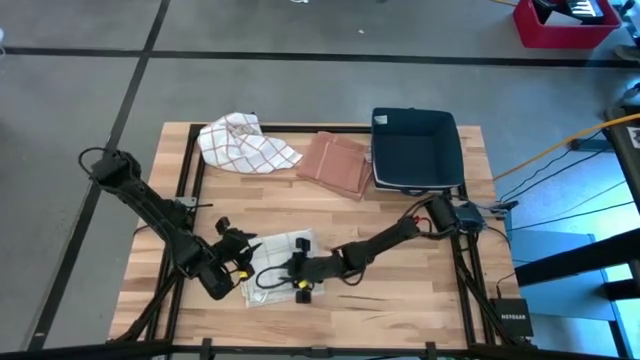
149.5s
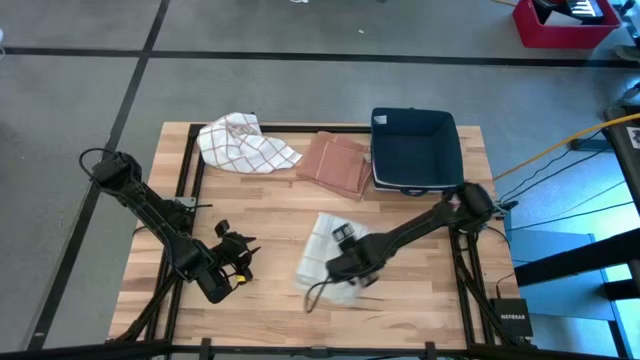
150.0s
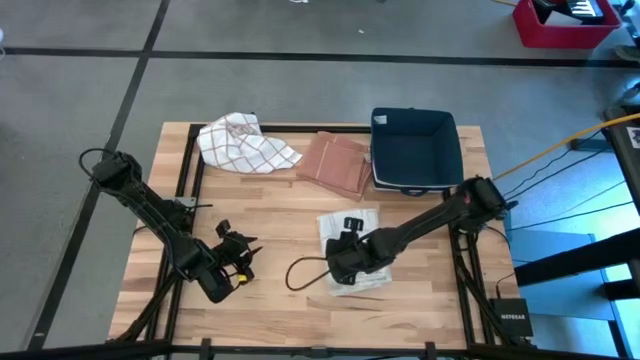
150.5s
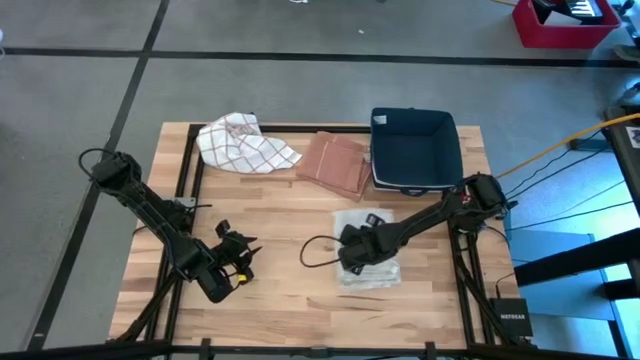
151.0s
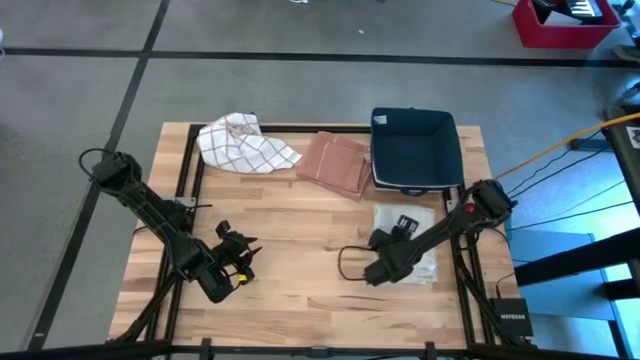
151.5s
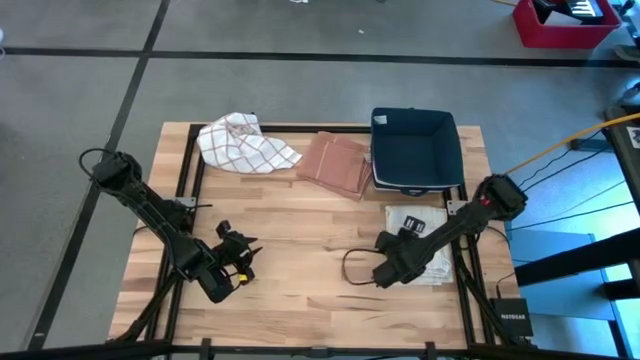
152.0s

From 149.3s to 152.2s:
Task: Fold towel
Move the bottom white towel to the middle right of the table

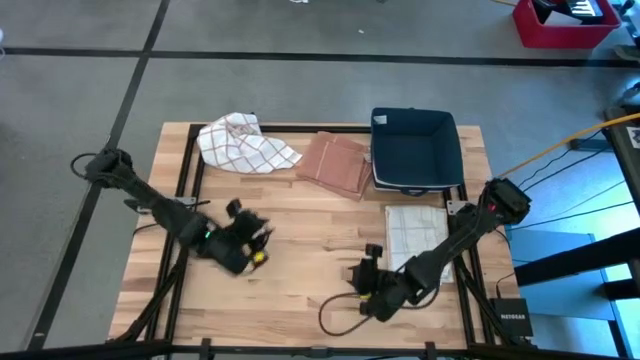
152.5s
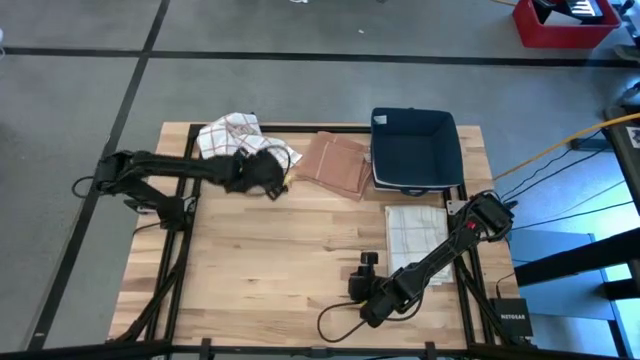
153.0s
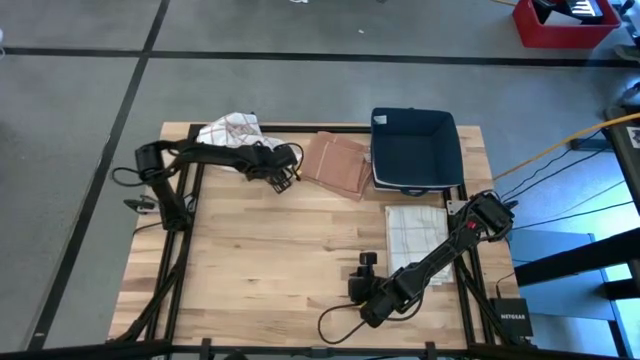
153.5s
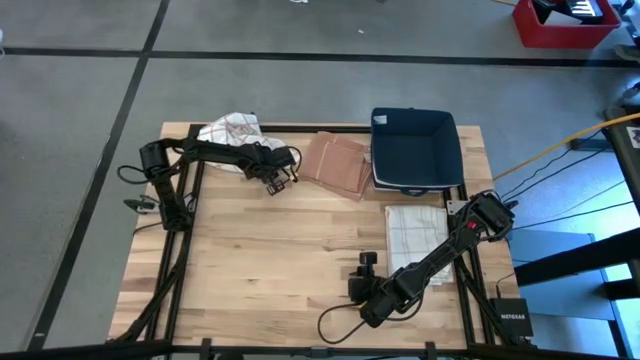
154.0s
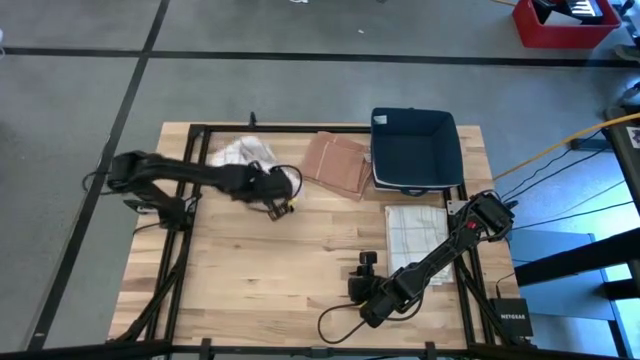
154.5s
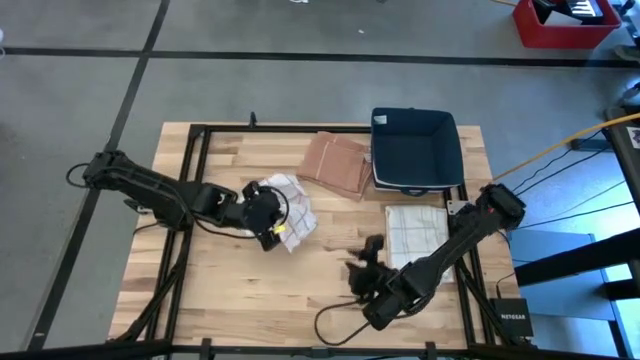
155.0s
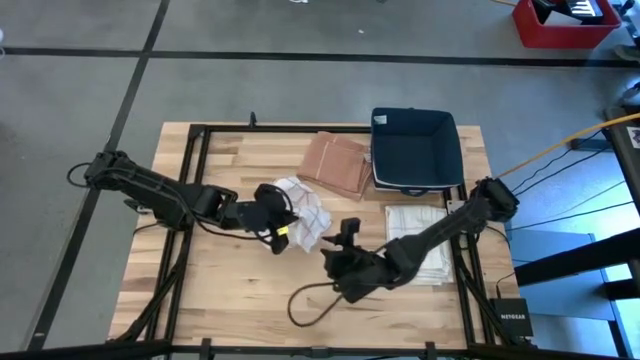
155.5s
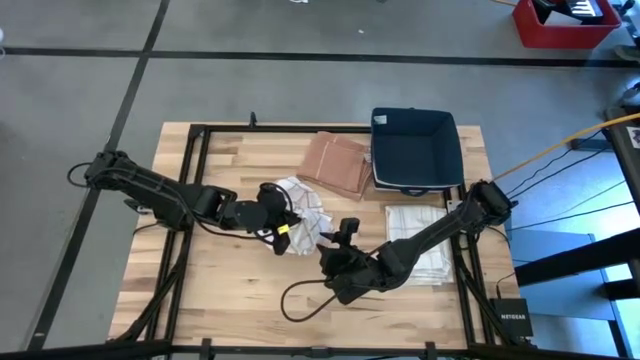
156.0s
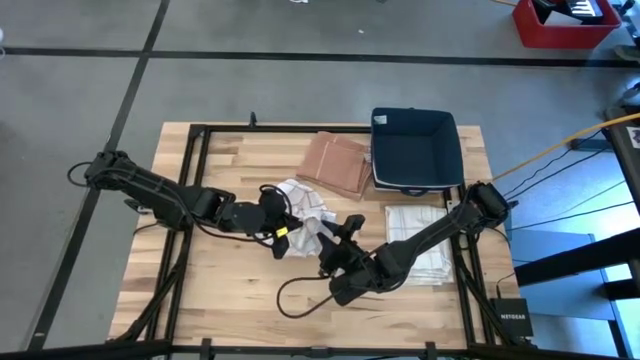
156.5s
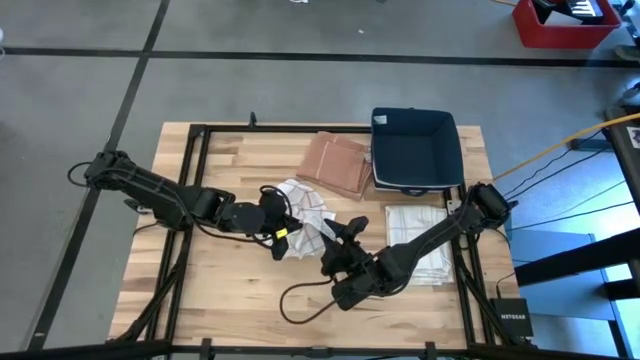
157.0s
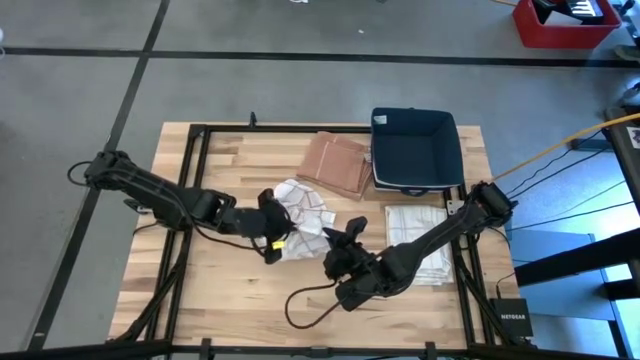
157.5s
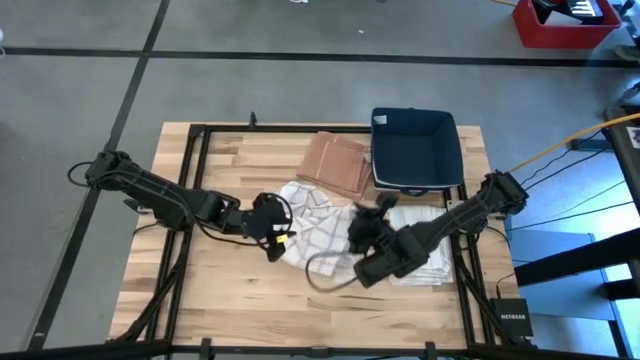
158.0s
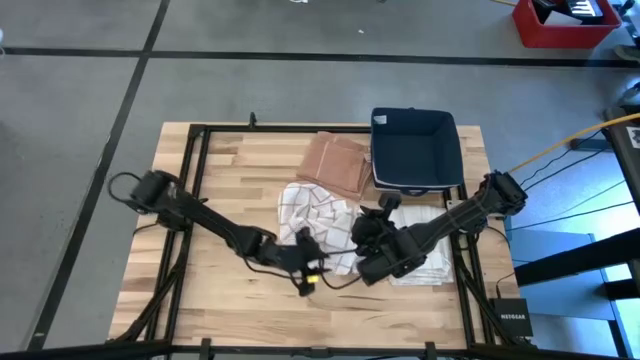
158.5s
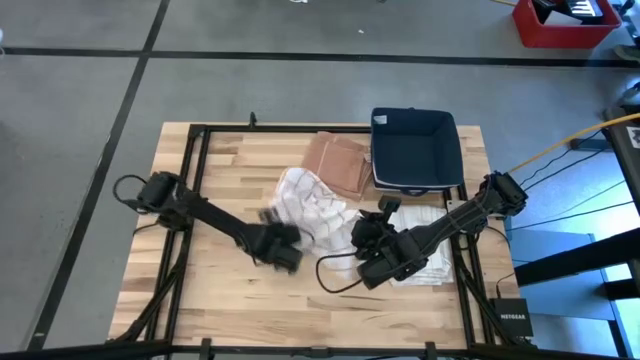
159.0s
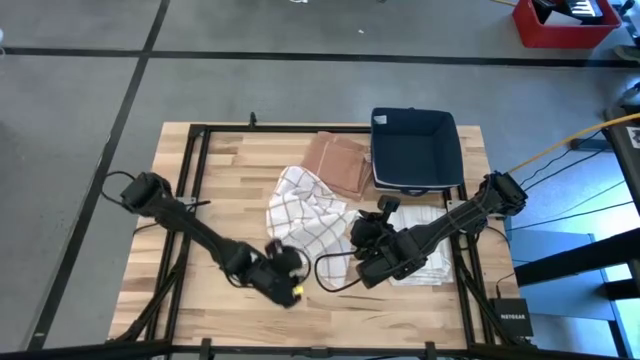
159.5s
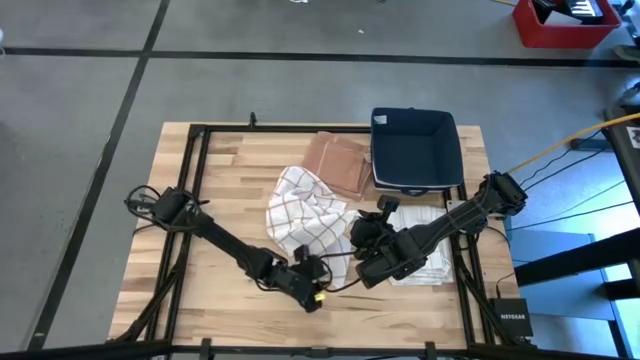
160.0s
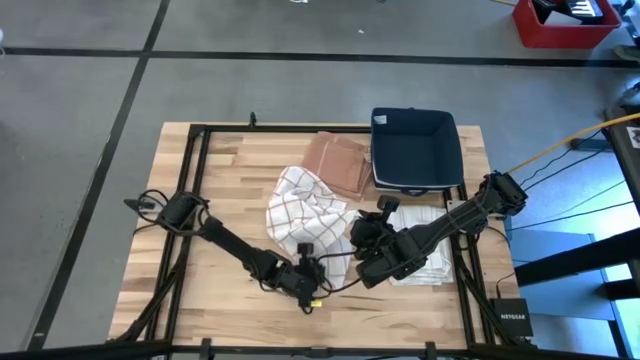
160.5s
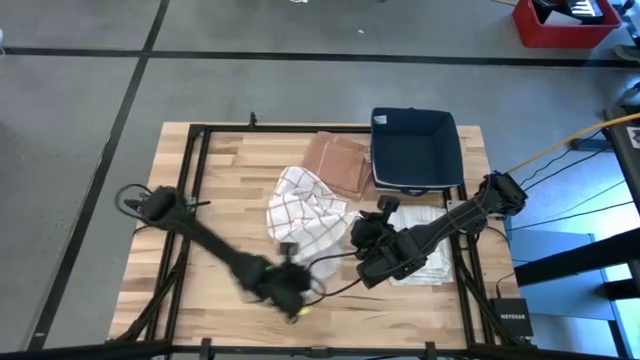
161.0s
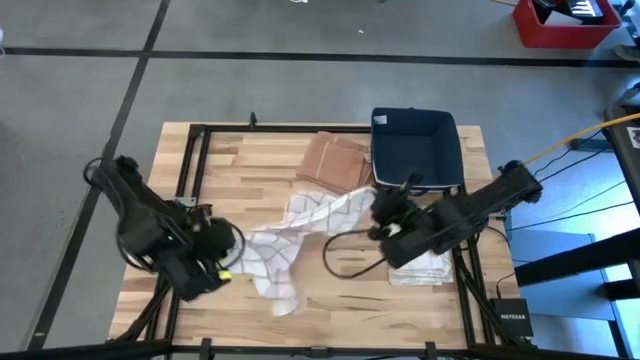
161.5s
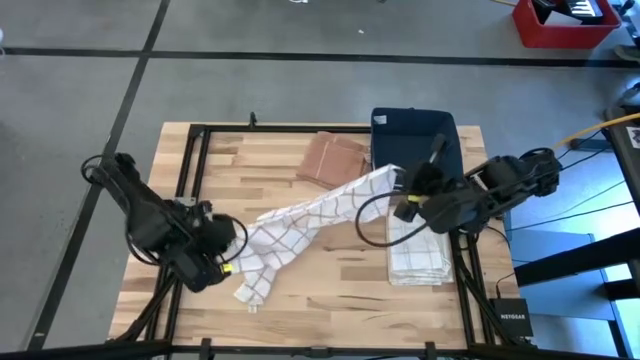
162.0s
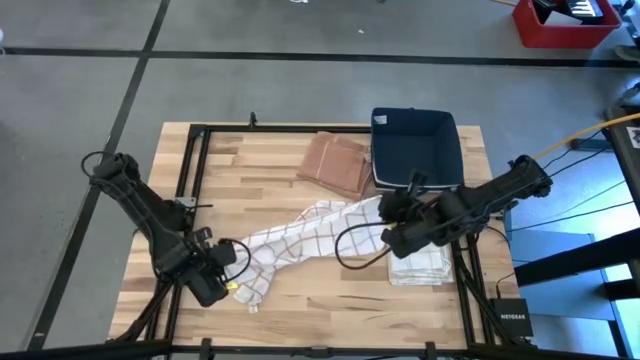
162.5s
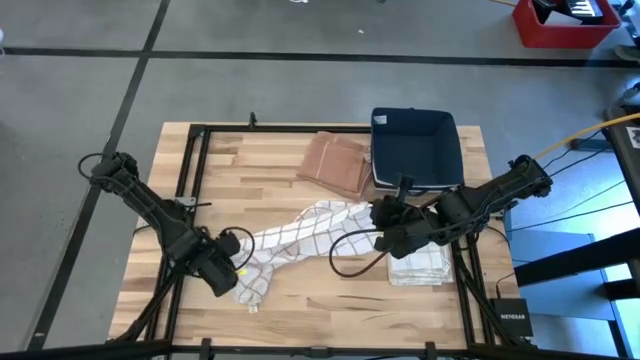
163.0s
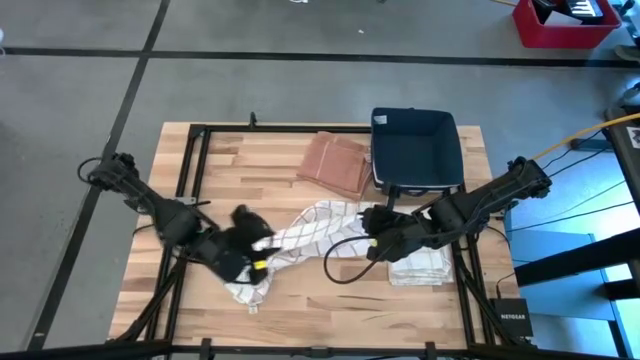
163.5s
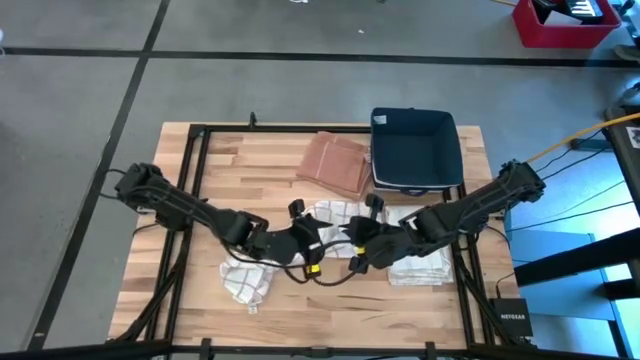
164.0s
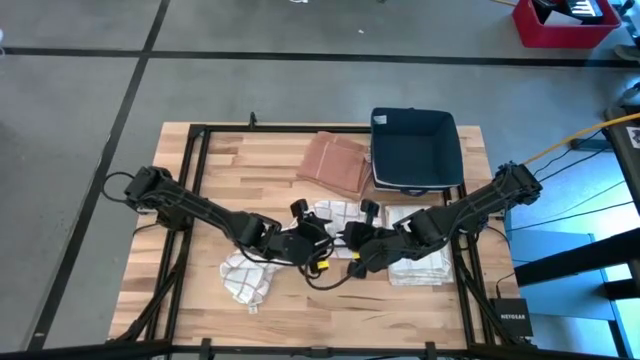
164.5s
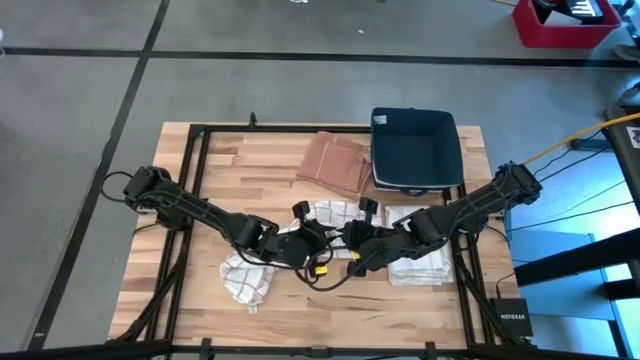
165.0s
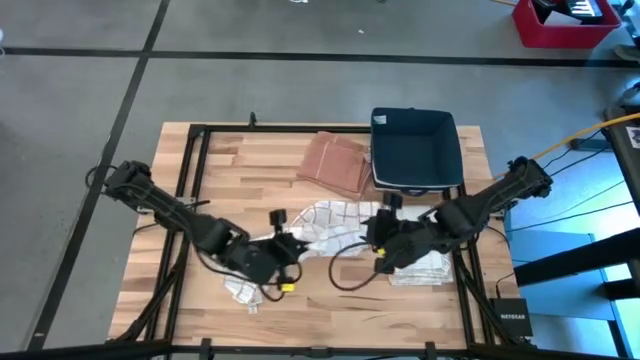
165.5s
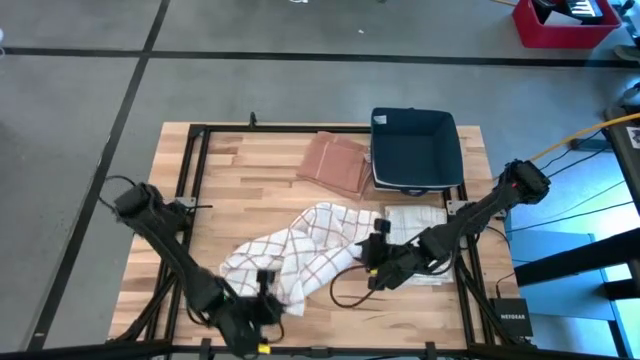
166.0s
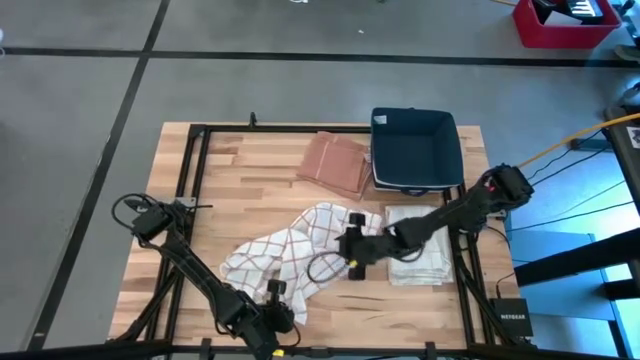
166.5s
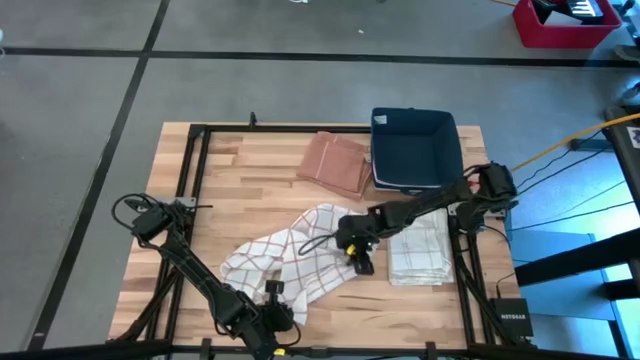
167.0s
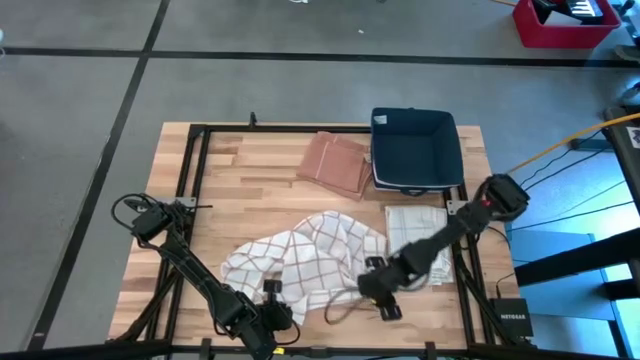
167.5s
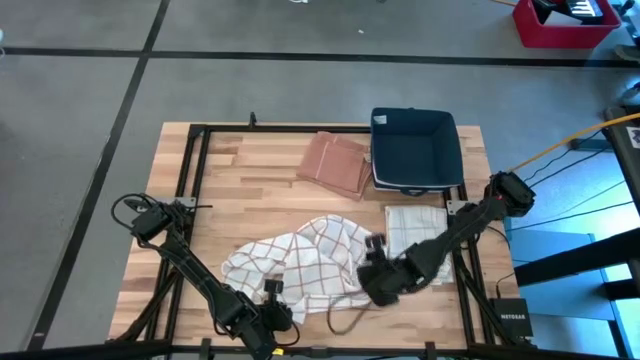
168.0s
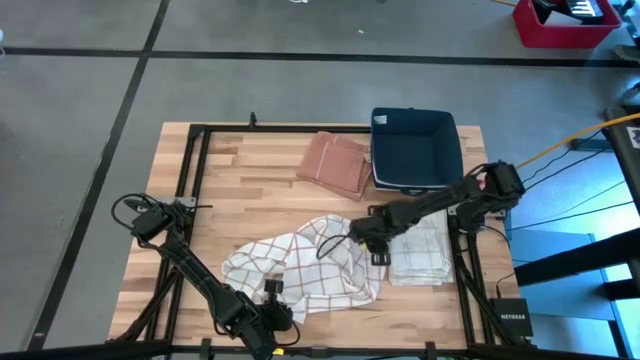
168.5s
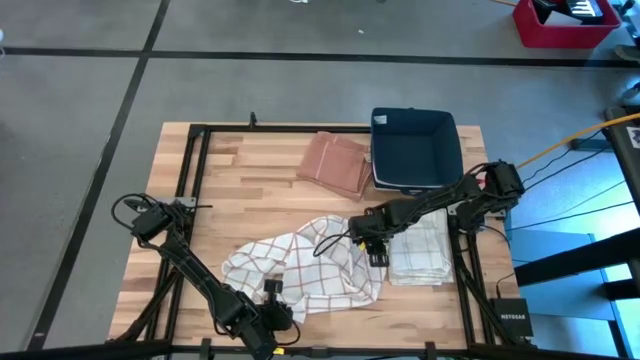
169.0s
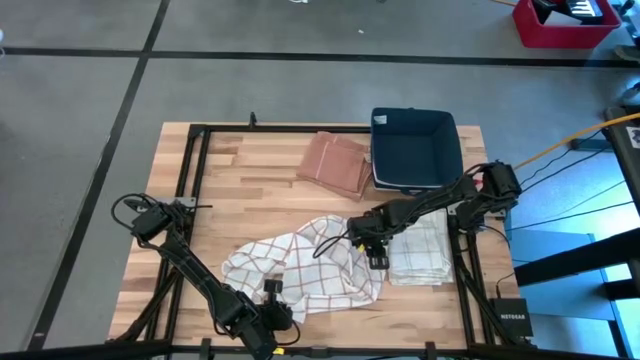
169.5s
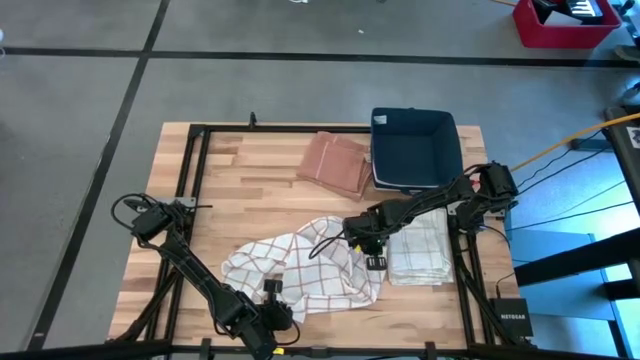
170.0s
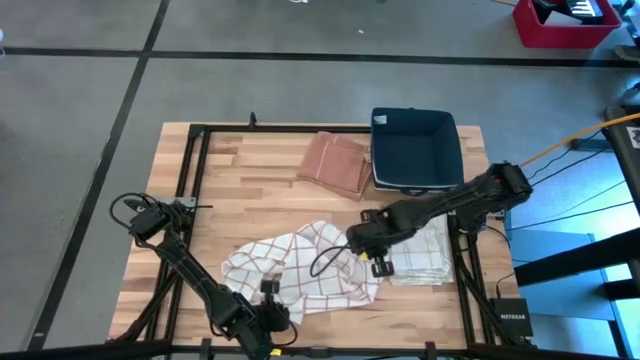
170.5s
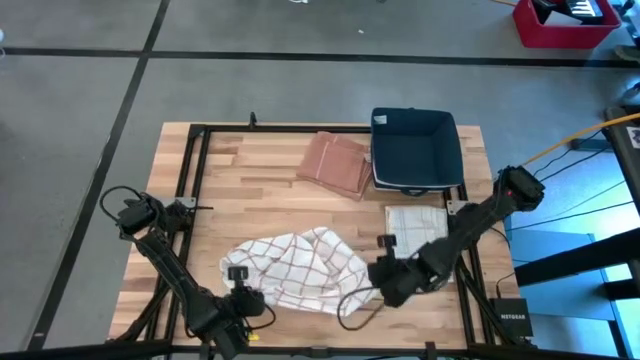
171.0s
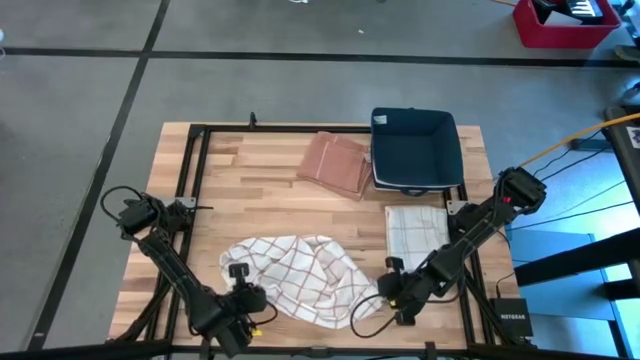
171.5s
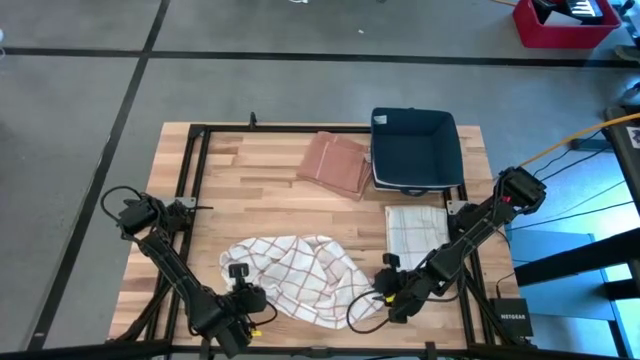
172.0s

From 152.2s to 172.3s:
Fold the white towel

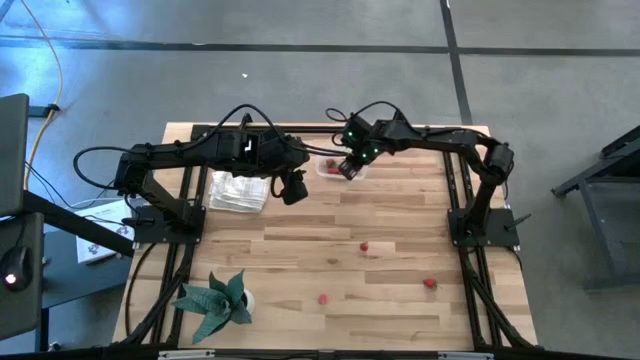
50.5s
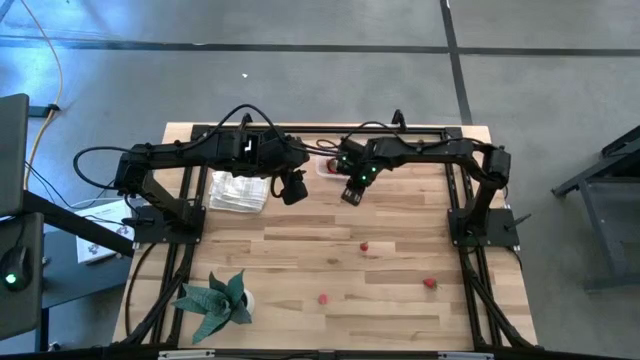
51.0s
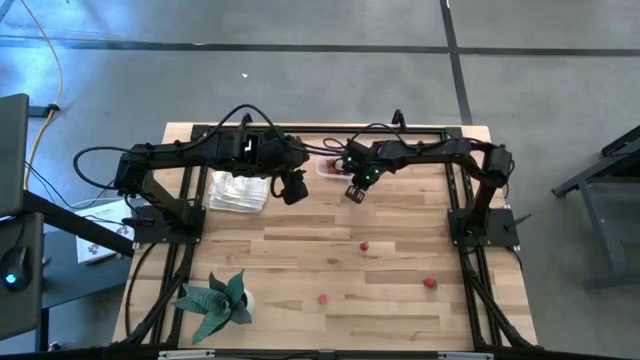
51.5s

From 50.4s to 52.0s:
Task: Pick and placing Produce into tupperware
Adjust the transparent container
